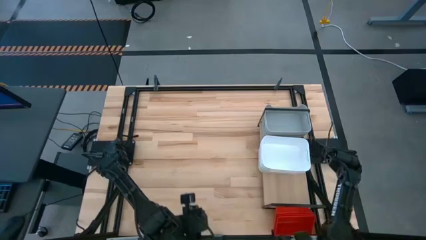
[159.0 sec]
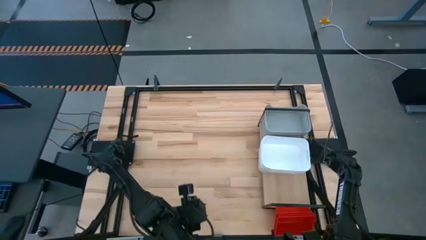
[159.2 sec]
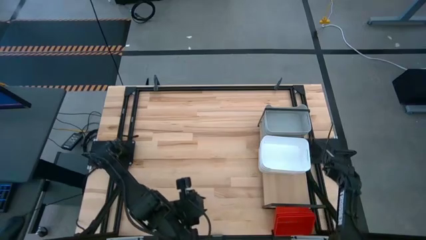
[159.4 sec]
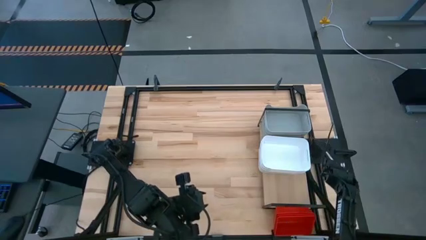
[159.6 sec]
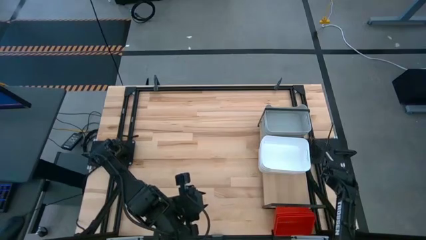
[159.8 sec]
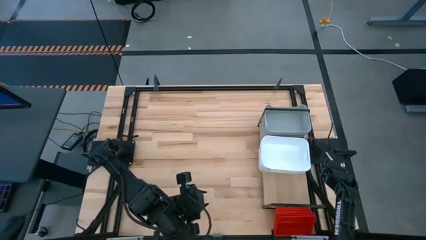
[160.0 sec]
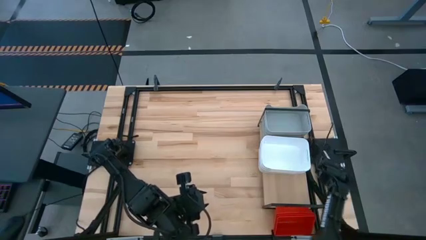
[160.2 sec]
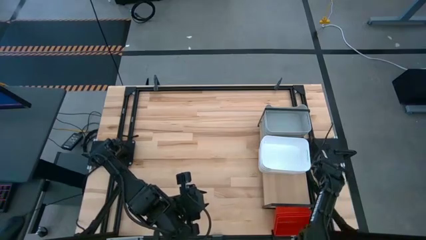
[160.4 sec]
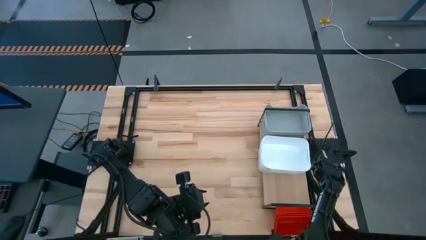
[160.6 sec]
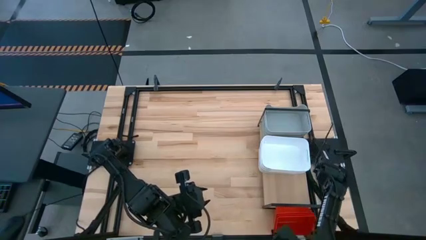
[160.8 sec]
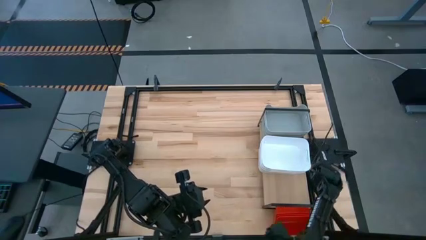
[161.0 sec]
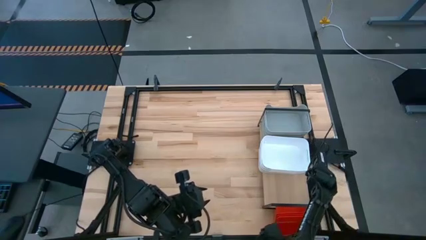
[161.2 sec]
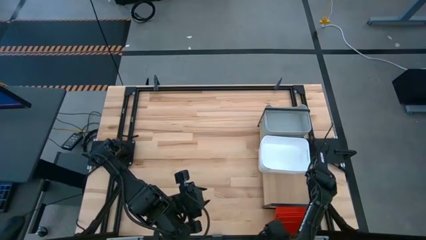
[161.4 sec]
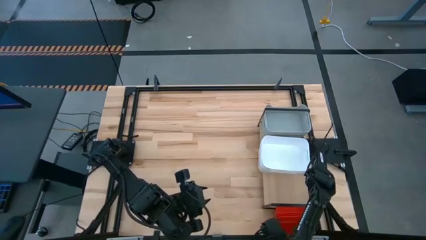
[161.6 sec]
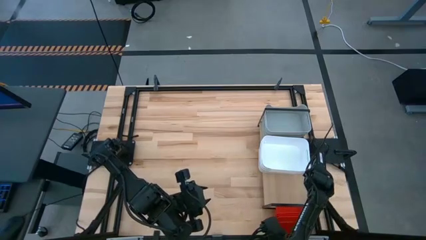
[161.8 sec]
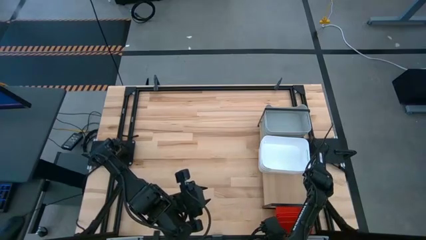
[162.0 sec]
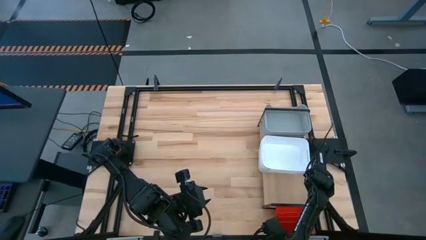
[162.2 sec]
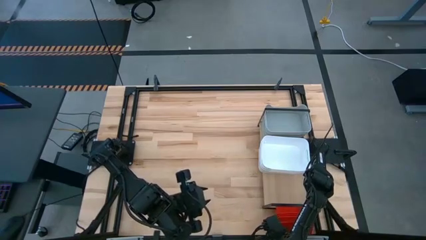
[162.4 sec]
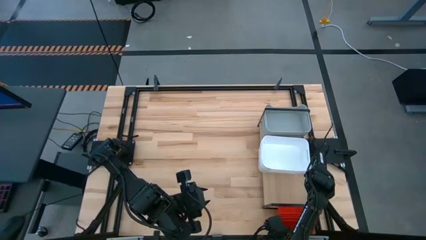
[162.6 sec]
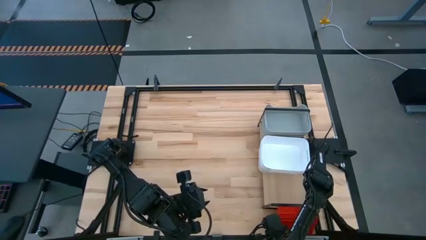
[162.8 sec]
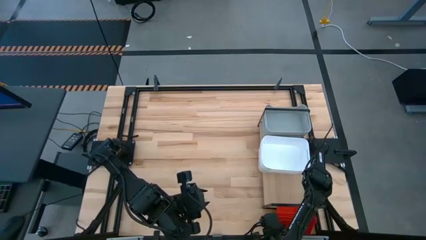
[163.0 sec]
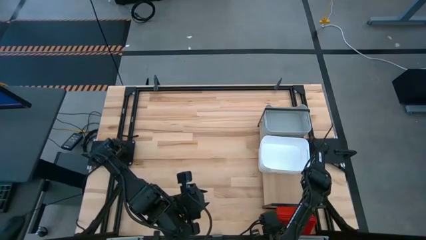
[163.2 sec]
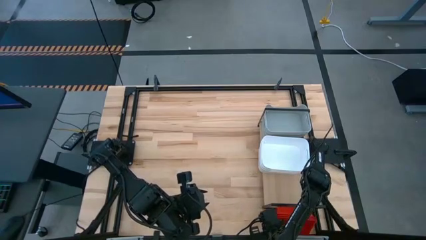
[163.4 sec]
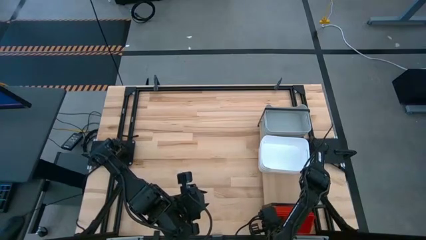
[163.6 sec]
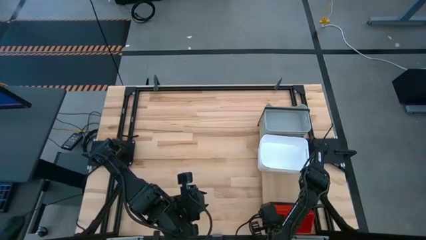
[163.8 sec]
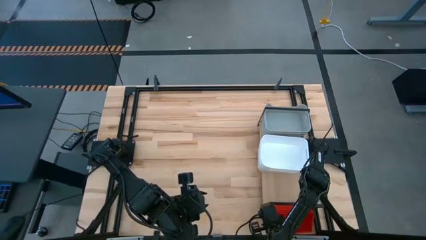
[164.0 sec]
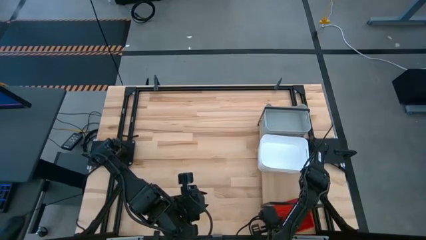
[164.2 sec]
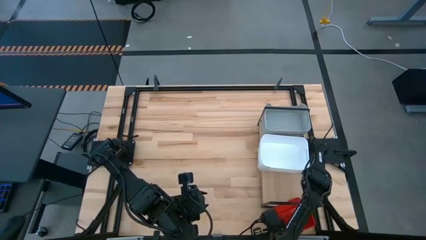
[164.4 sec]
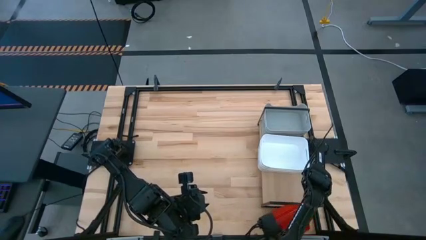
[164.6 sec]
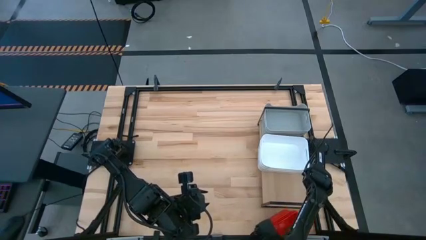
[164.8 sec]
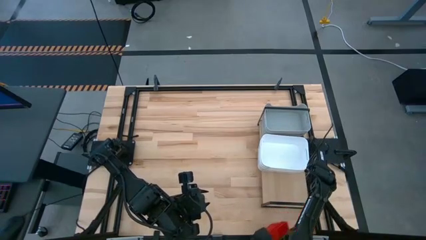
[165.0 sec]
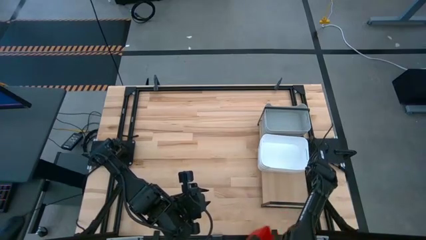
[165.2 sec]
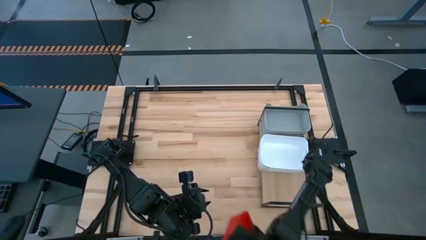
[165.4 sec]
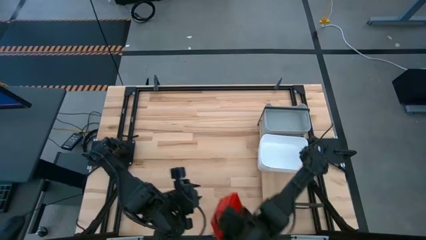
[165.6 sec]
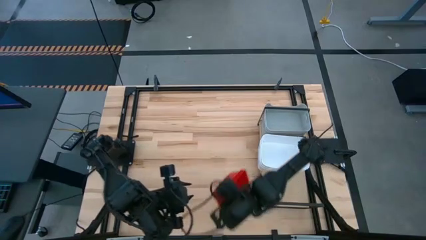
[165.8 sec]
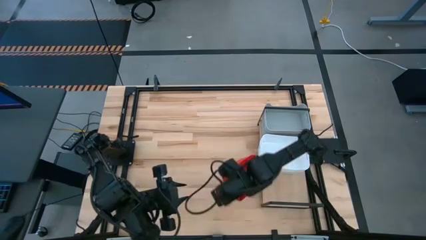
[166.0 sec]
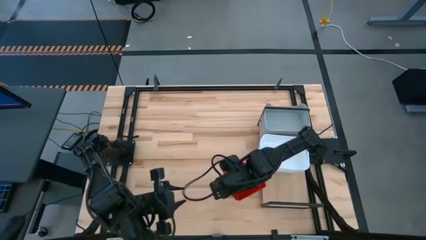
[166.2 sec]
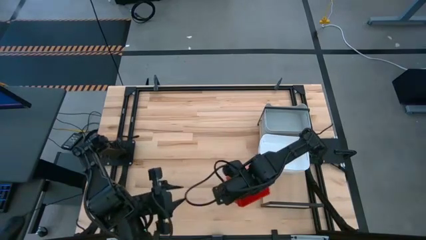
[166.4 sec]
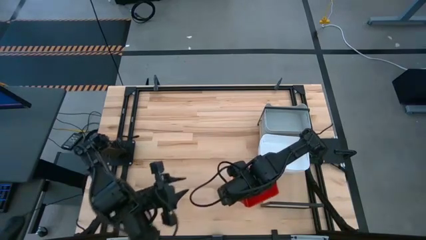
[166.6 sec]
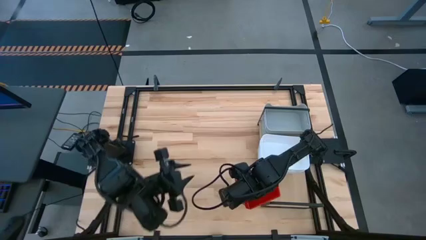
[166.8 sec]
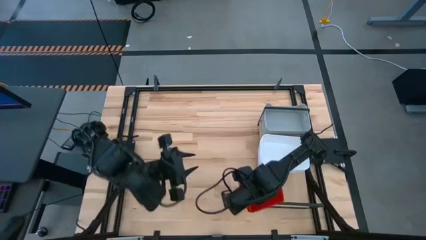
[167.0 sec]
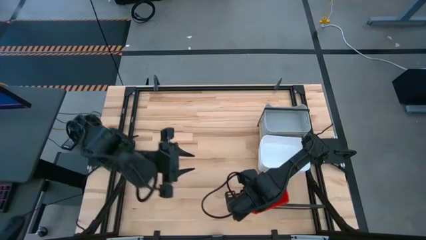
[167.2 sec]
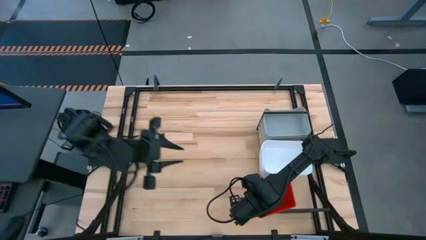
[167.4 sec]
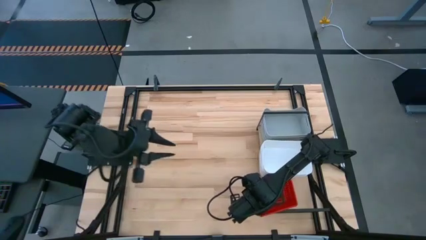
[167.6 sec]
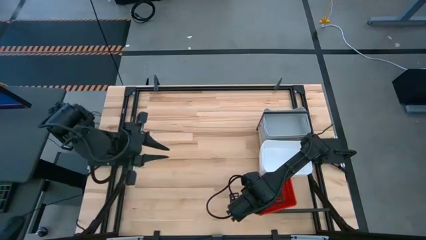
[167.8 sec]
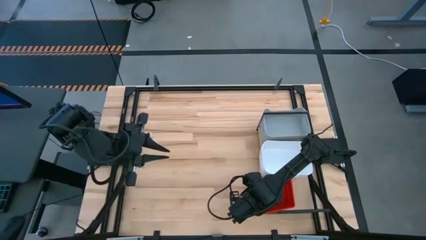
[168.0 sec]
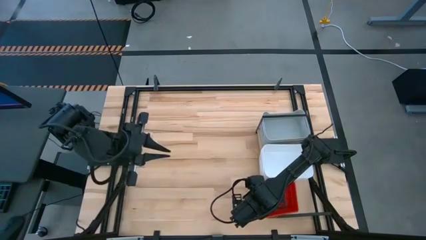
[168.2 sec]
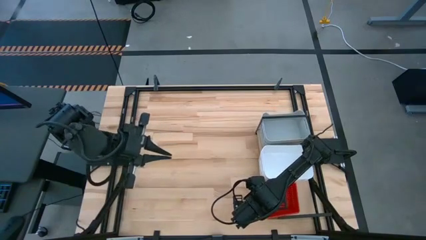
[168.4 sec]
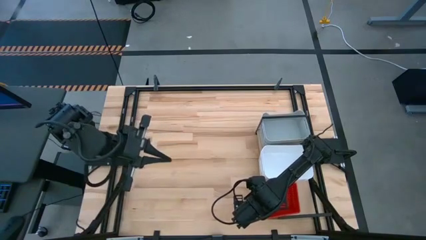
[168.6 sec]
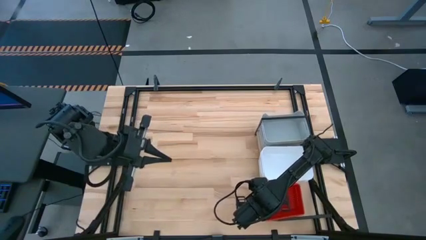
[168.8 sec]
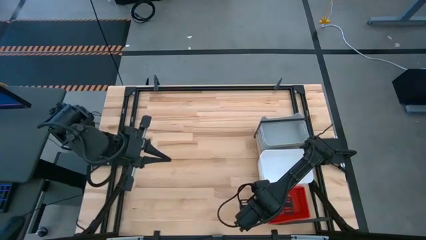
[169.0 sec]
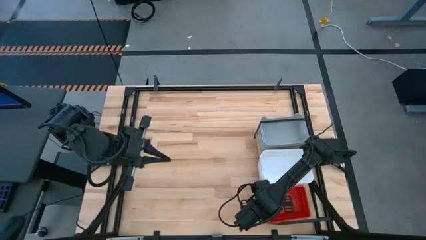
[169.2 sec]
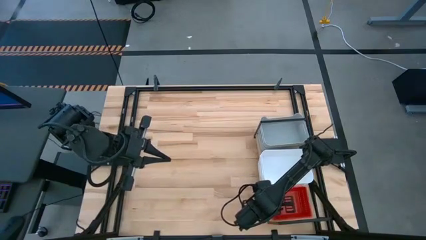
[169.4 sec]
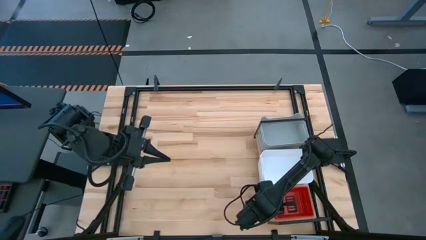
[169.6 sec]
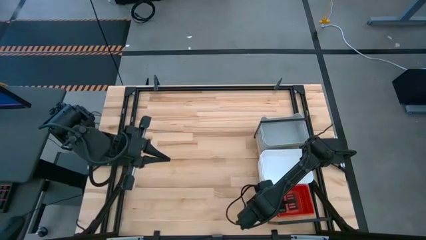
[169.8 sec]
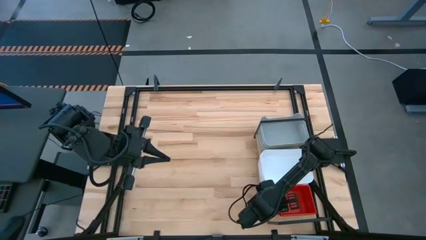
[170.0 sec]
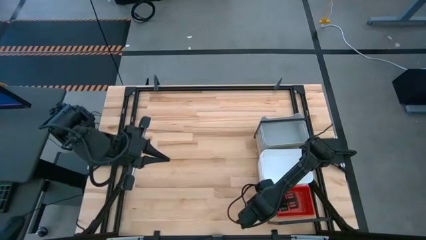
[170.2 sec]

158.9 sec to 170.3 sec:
Task: Stack baskets on shelf by color
Adjust the stacked red bins on the shelf

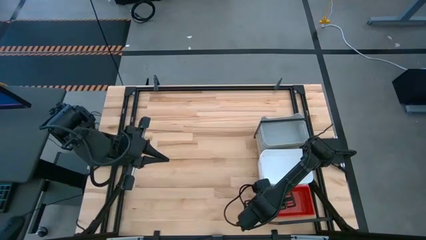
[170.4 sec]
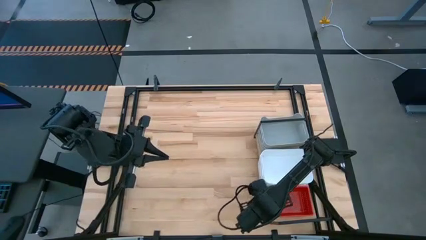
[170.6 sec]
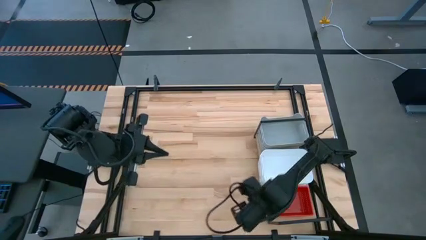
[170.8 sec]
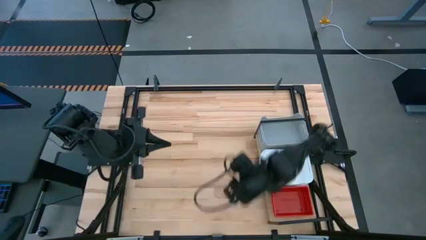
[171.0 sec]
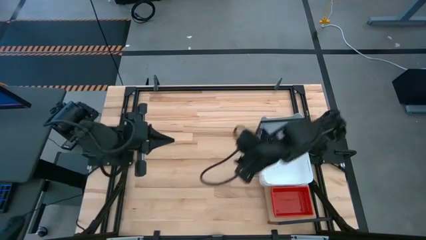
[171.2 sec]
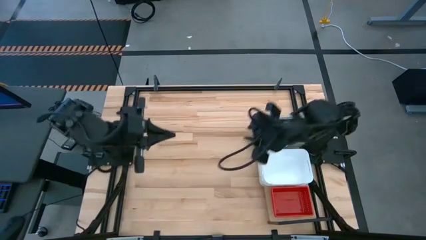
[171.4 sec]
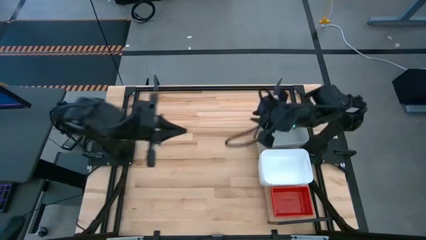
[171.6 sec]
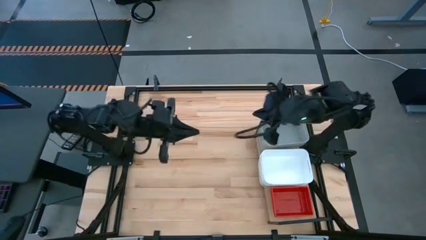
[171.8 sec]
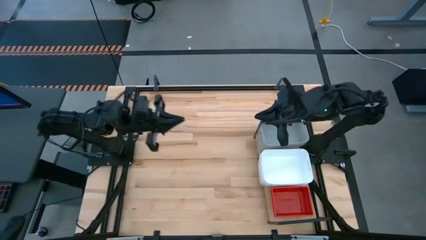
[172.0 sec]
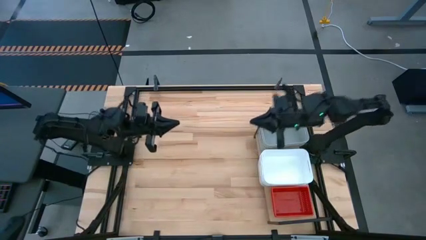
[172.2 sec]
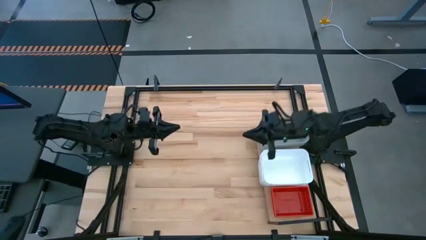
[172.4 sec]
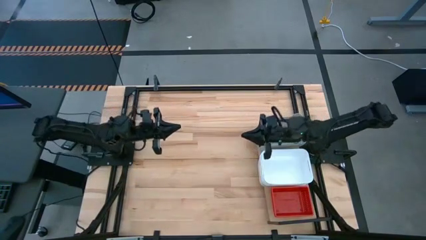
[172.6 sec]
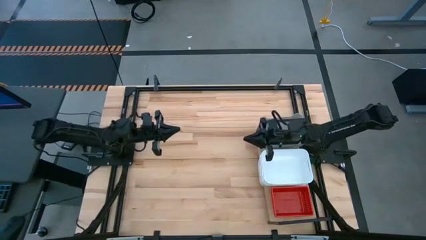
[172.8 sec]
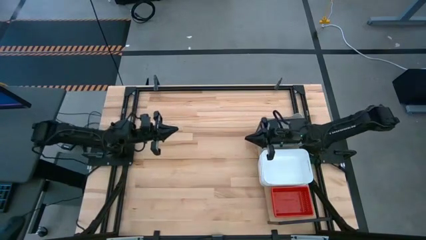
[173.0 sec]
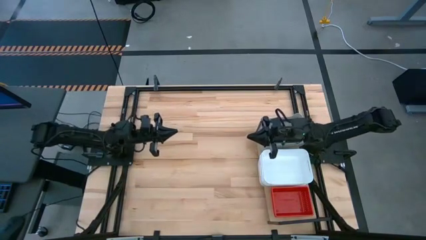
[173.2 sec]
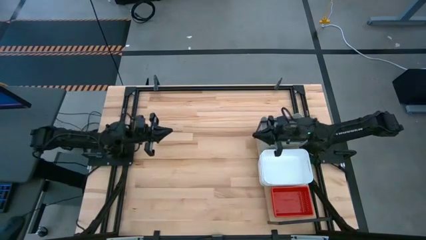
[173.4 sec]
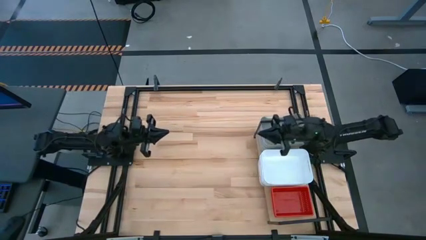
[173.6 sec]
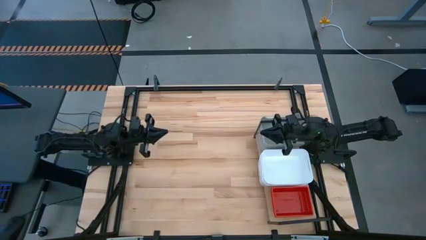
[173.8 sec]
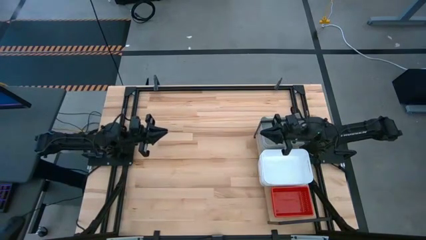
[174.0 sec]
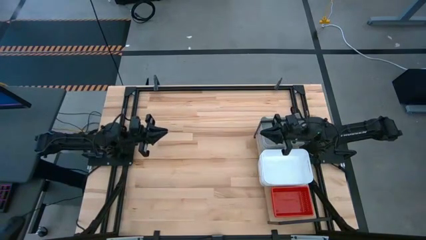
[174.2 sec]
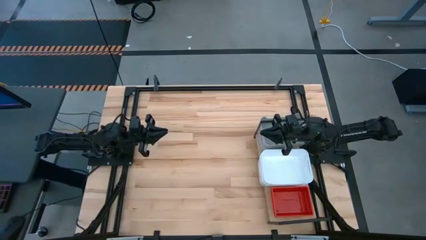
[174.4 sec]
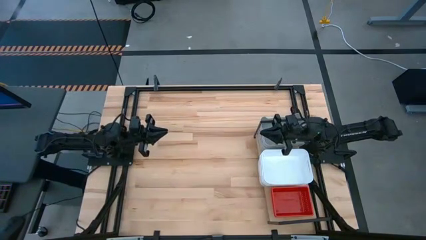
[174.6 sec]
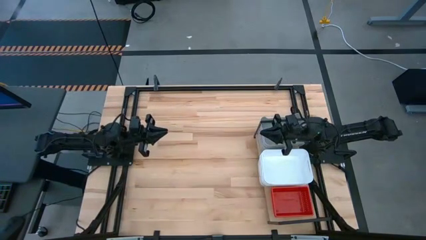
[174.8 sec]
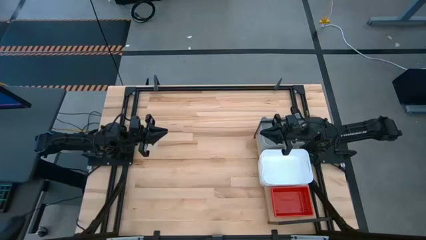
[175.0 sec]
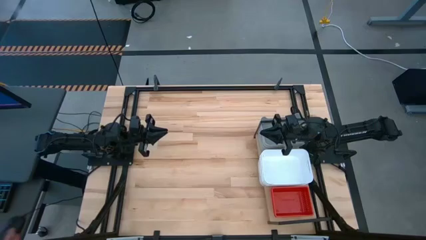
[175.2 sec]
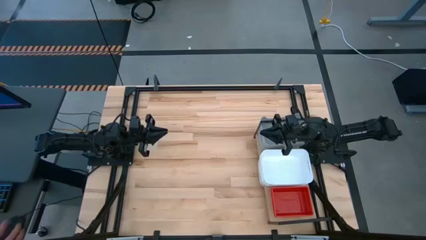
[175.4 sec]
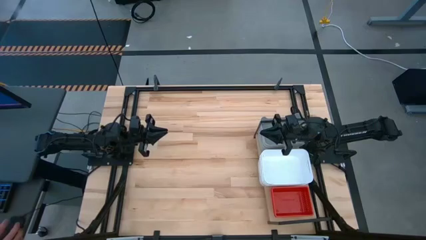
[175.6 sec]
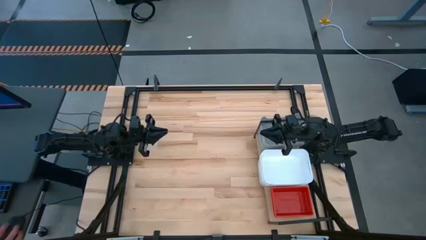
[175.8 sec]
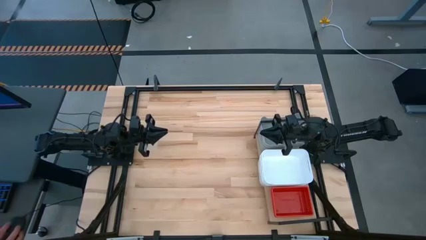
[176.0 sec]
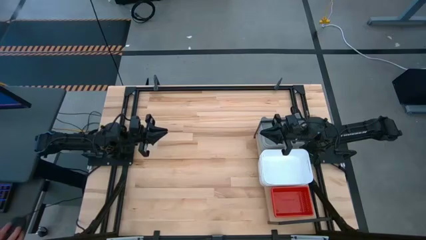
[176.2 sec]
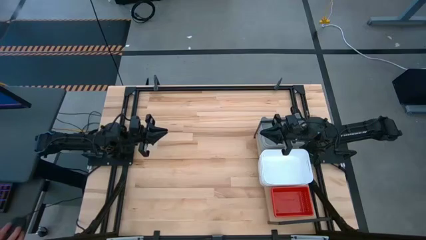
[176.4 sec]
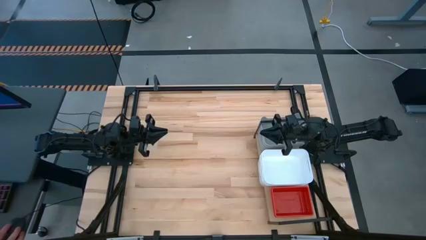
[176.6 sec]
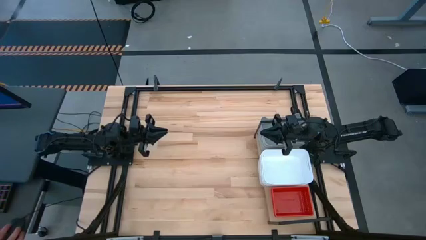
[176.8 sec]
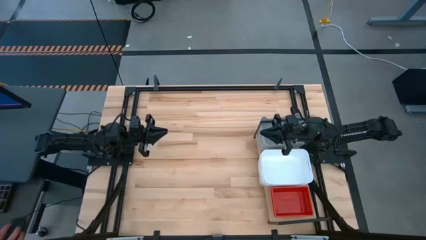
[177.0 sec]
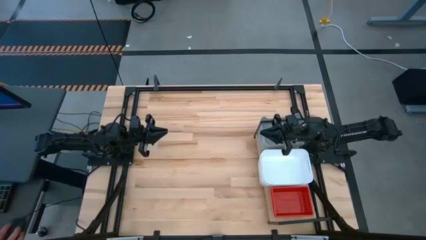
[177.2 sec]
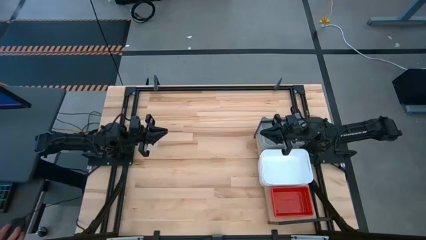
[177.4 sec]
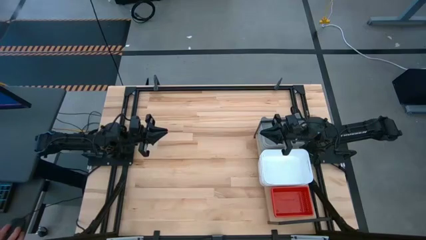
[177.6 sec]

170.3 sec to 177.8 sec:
Return to Home Position
